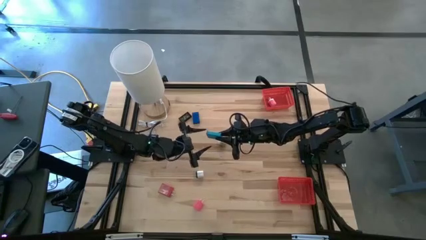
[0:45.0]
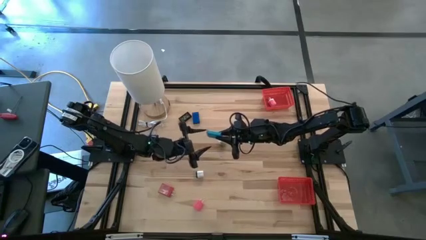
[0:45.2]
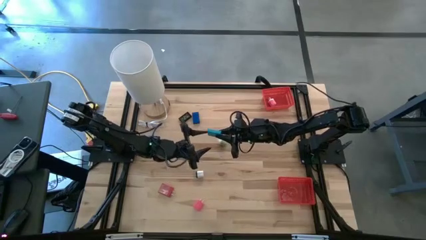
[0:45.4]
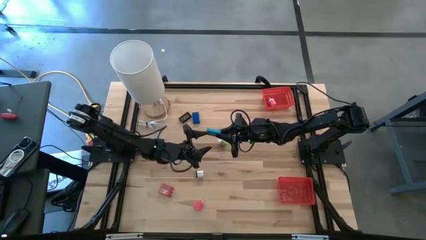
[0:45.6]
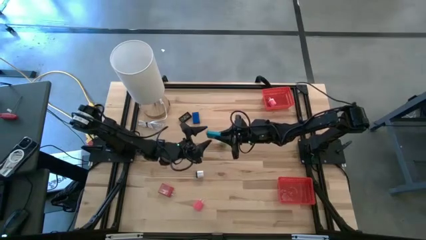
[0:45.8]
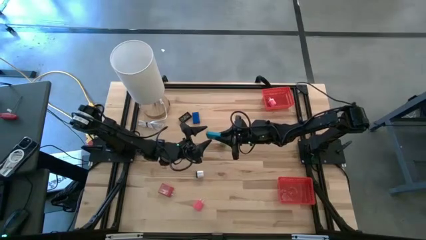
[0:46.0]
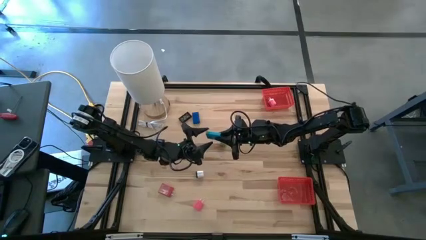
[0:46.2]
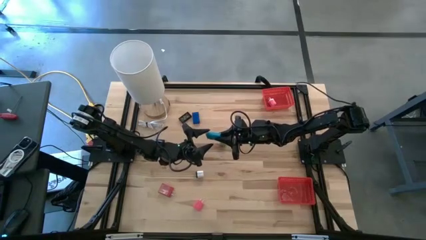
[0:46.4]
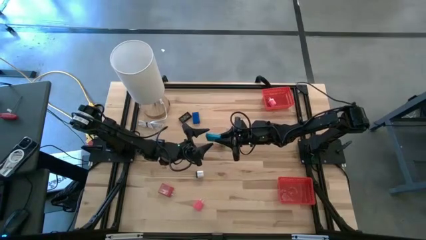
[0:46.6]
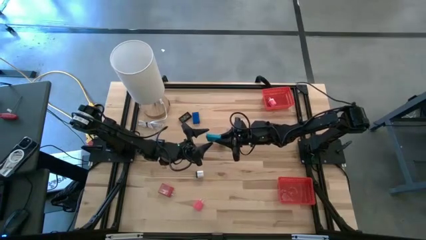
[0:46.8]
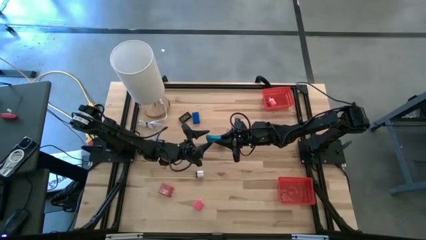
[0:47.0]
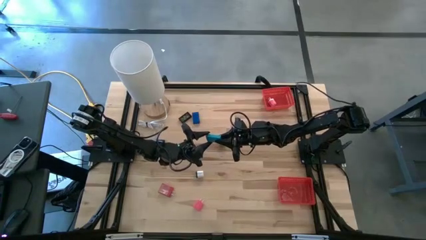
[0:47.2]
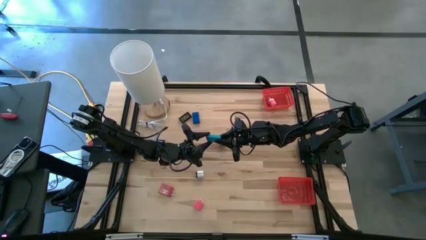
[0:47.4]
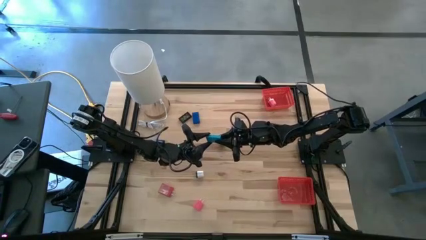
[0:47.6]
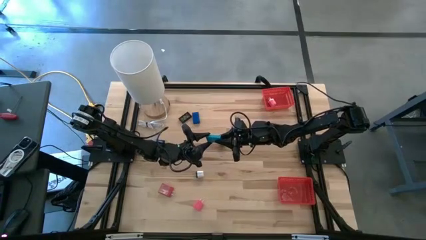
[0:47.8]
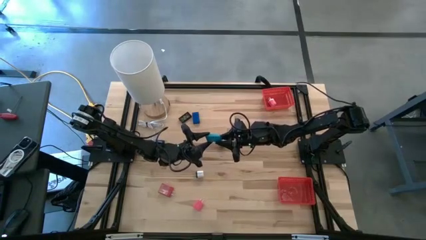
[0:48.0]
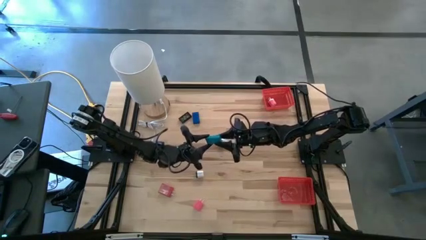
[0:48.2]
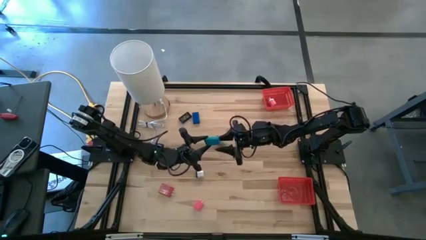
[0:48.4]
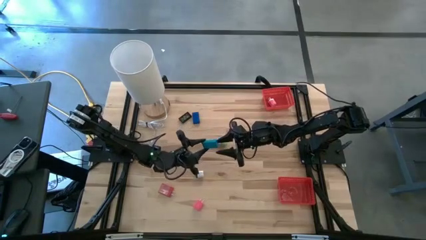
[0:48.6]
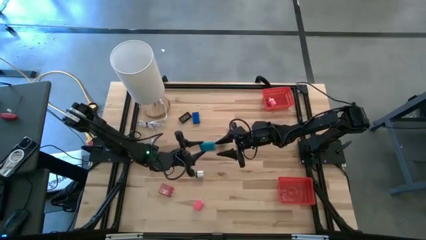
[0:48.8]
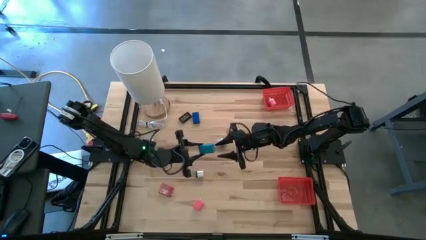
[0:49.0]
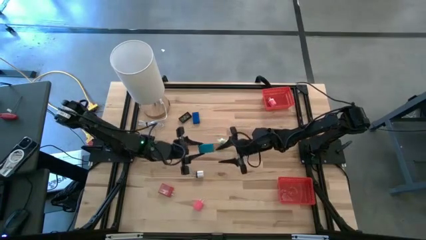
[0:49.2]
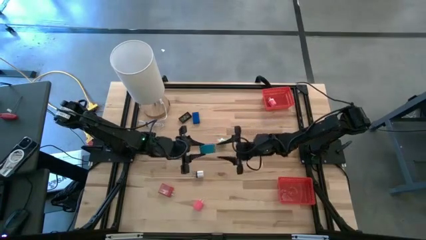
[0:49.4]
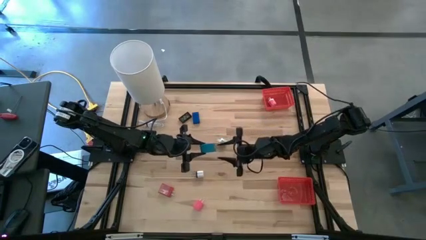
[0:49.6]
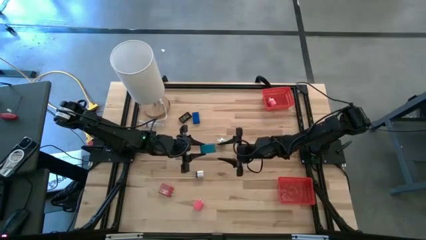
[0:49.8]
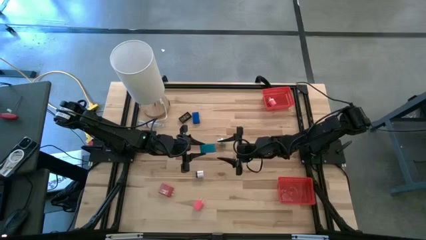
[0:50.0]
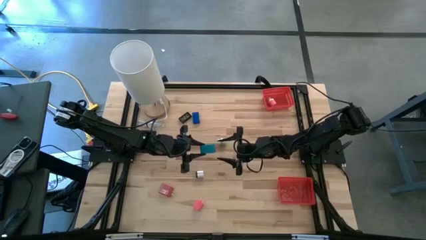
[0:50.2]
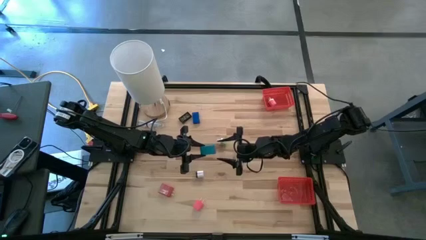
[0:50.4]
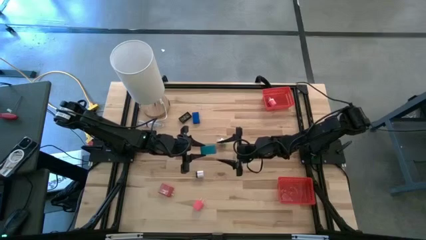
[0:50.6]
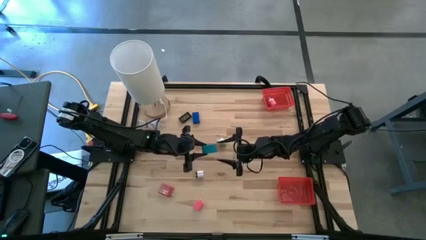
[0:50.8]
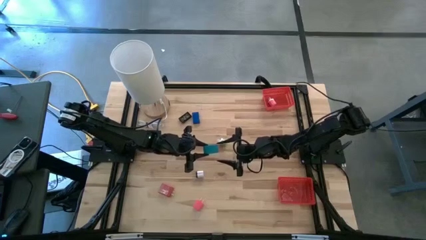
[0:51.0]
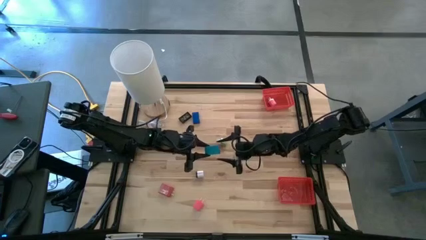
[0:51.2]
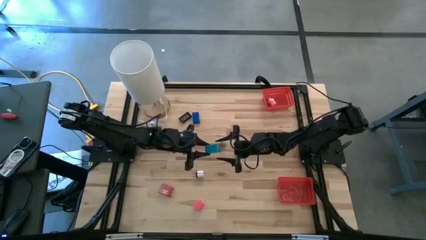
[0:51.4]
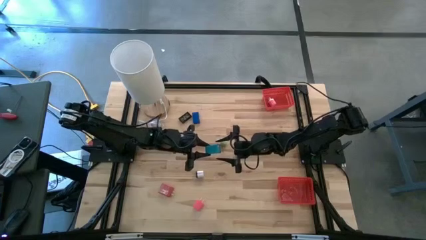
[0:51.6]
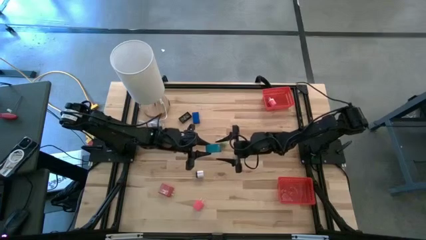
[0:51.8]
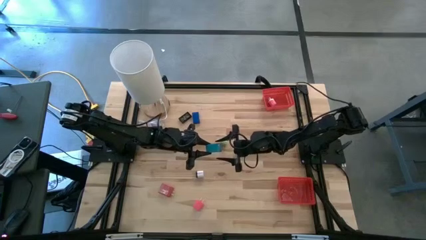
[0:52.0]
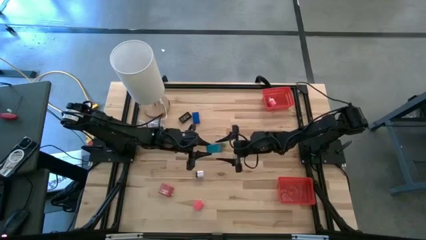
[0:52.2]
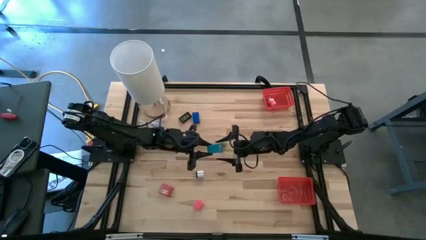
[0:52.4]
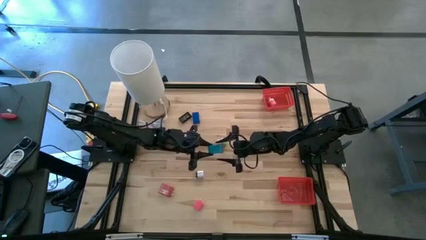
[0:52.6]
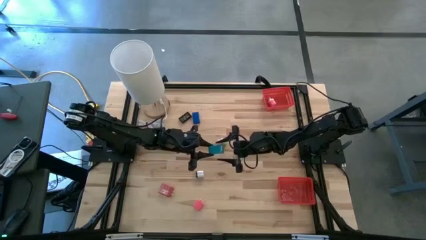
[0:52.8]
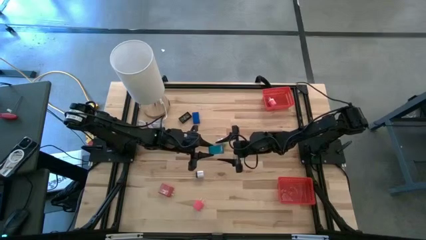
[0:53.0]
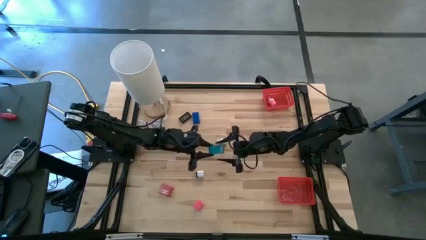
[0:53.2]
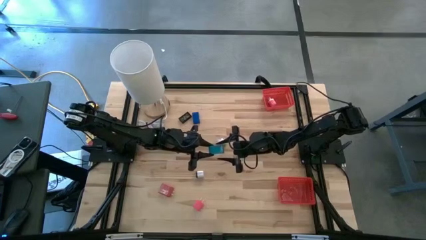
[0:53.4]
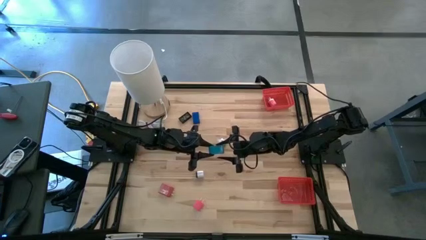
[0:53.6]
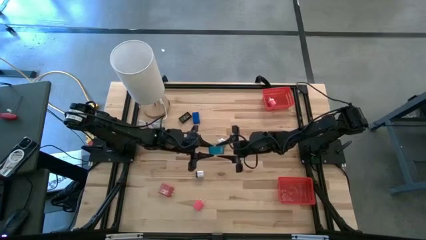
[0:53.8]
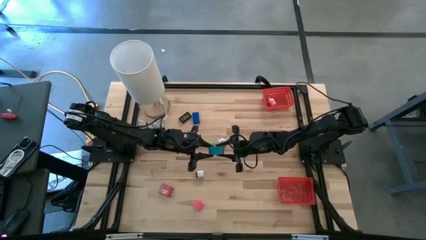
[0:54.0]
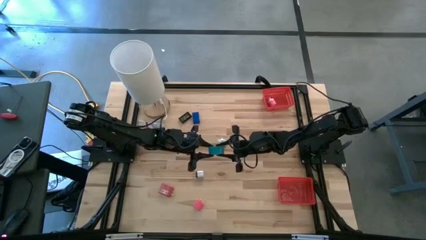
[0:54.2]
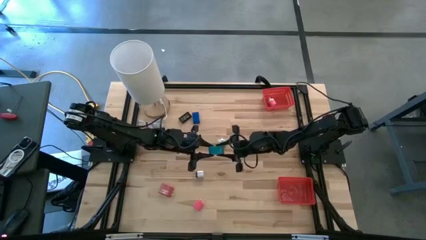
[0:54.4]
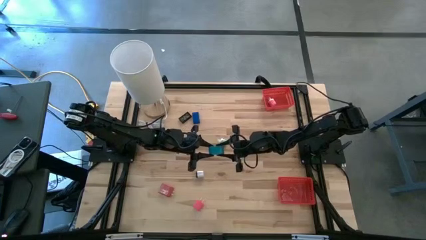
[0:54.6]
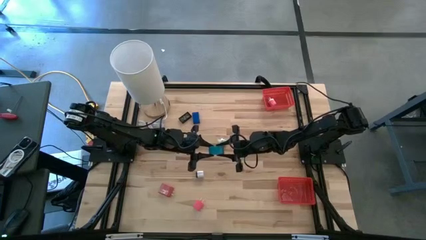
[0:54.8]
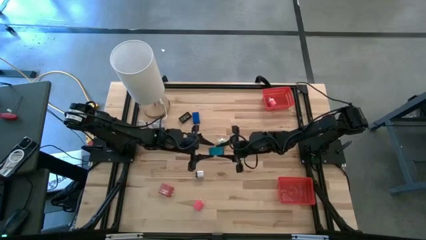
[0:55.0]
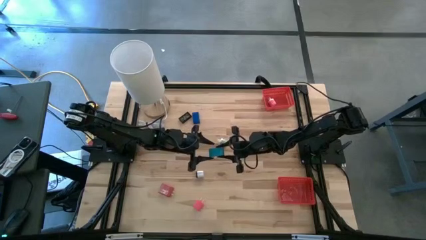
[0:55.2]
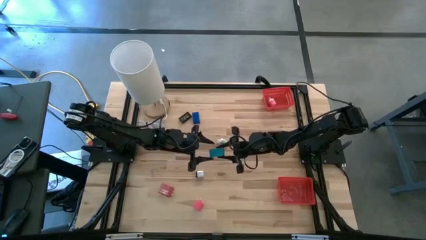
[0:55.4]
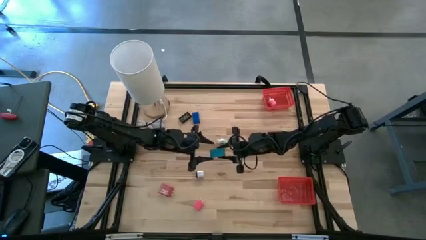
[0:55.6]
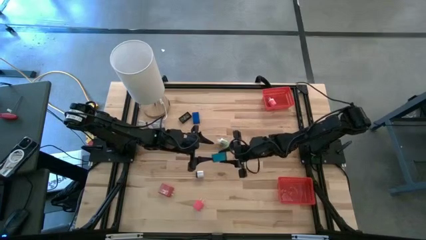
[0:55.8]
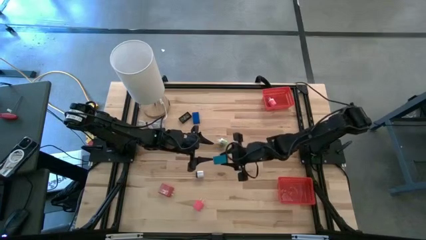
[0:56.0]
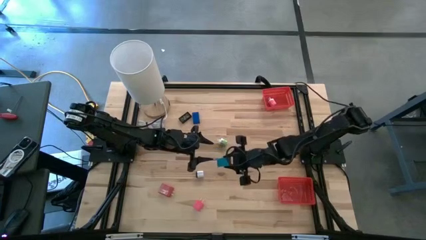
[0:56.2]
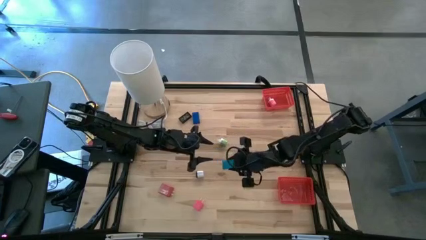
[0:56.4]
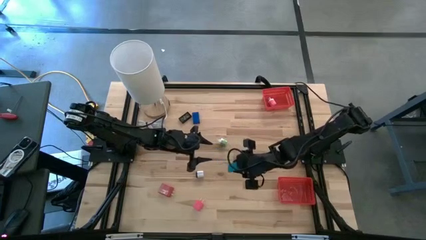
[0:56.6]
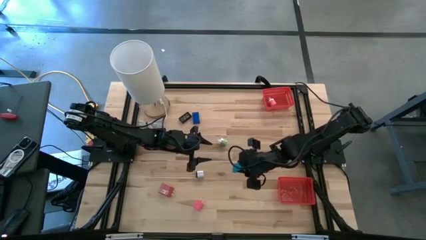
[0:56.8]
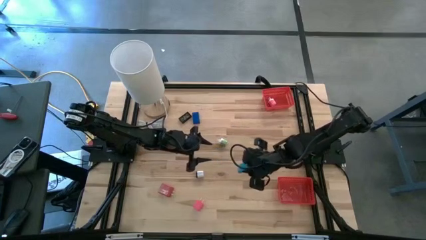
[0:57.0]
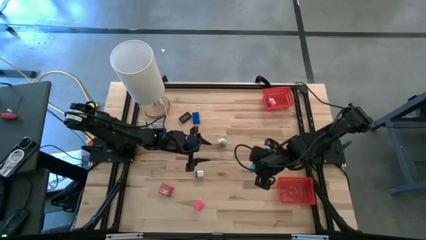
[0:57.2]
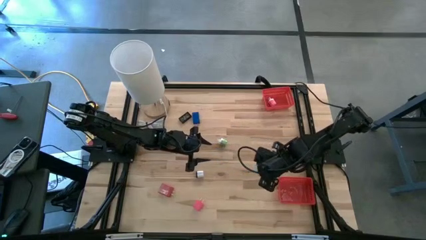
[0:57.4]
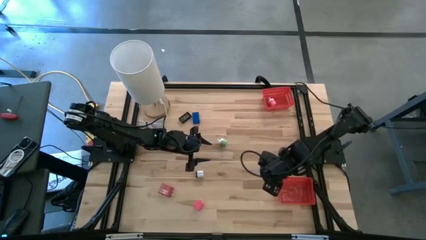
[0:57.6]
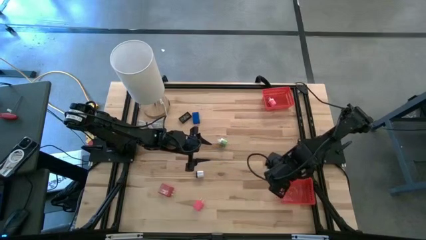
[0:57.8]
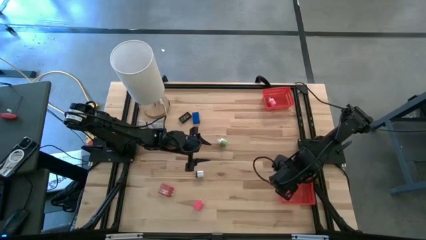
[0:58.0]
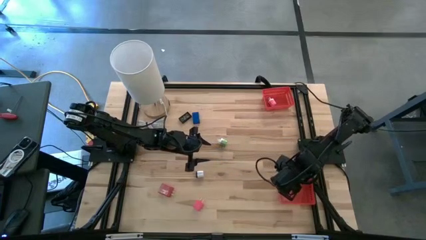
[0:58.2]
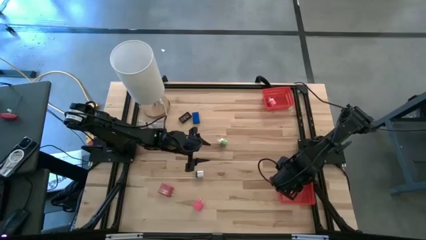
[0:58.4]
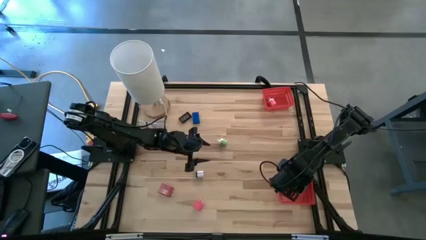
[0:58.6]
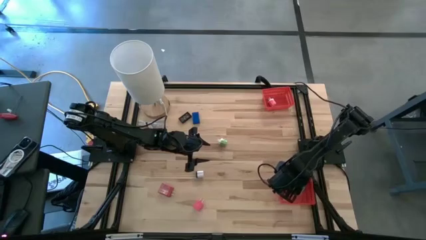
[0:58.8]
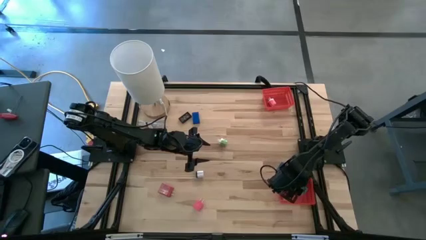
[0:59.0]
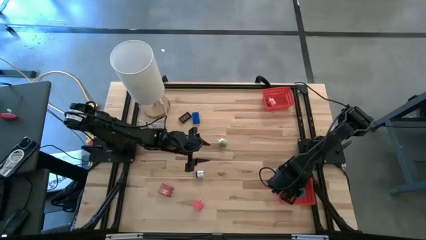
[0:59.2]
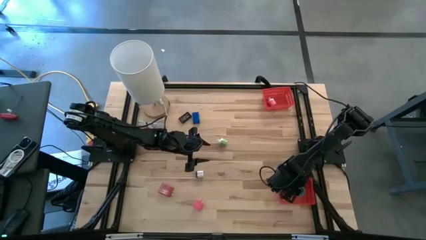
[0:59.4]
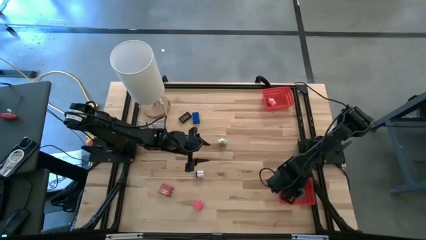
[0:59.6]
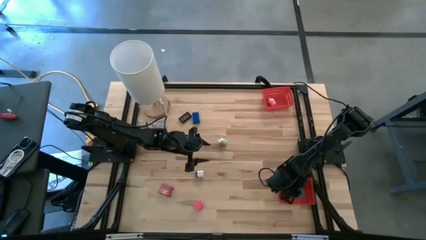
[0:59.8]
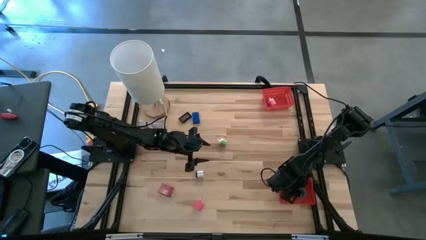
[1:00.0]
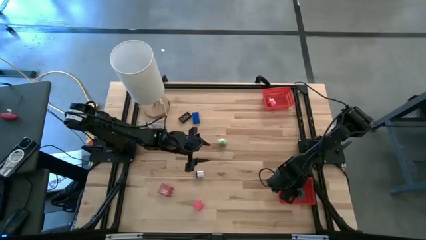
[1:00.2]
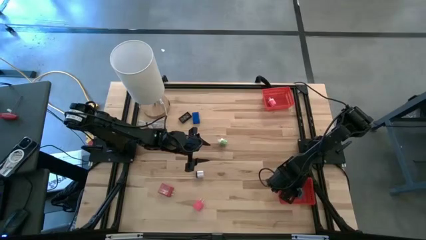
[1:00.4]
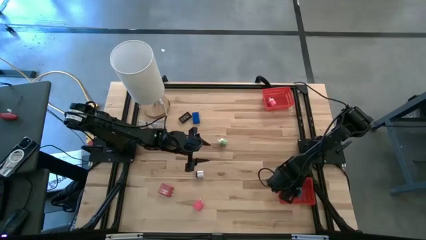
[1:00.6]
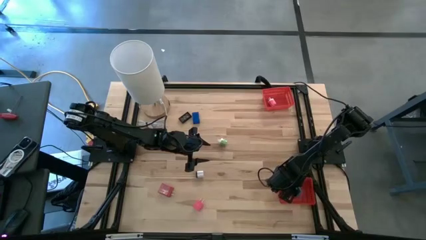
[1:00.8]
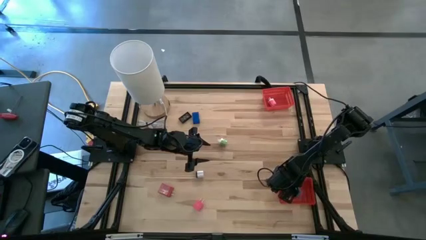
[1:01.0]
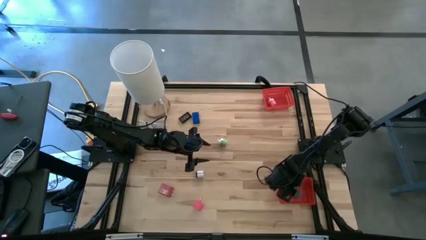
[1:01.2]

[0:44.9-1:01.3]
Task: Pick & Place Office items
Put the light blue digital clock into the bottom red basket
